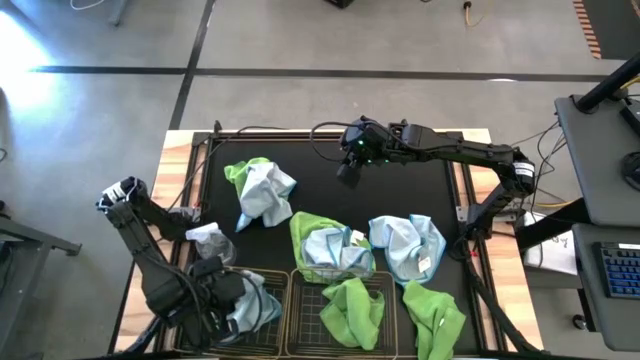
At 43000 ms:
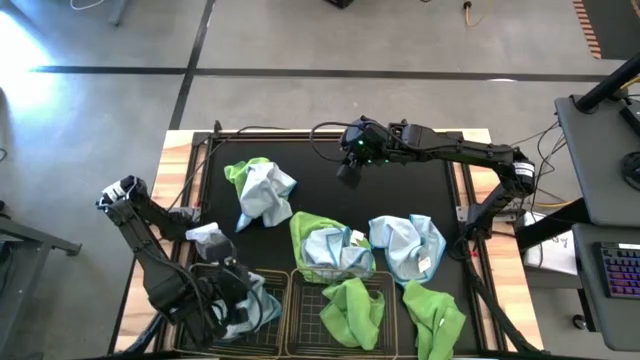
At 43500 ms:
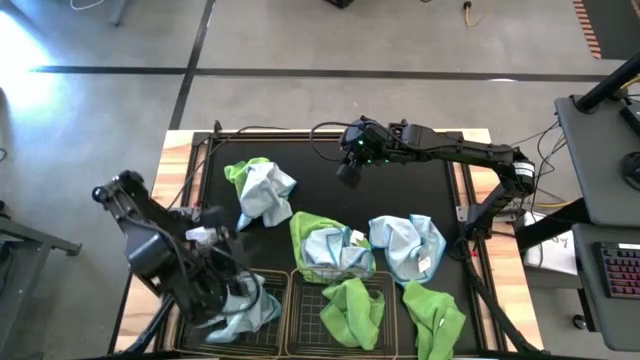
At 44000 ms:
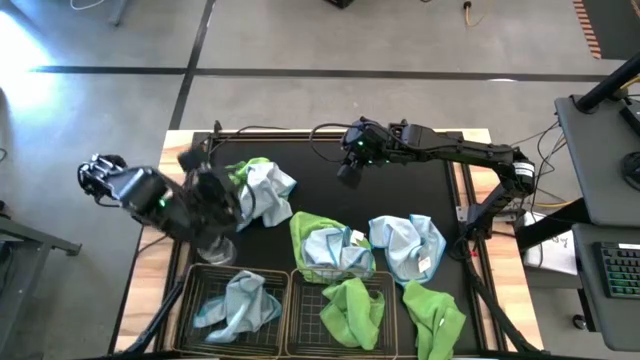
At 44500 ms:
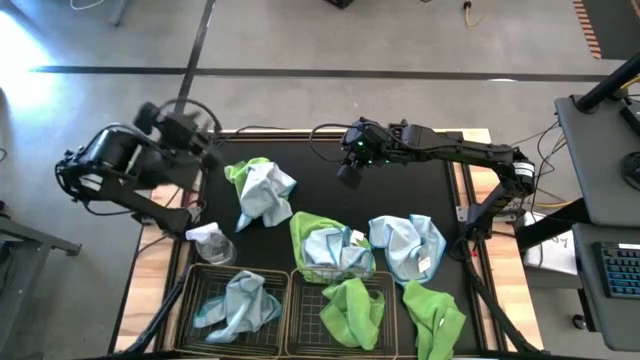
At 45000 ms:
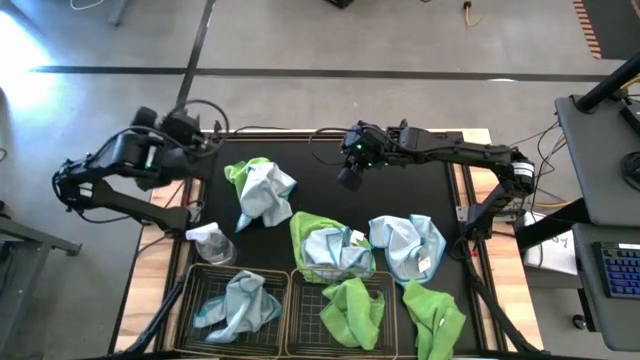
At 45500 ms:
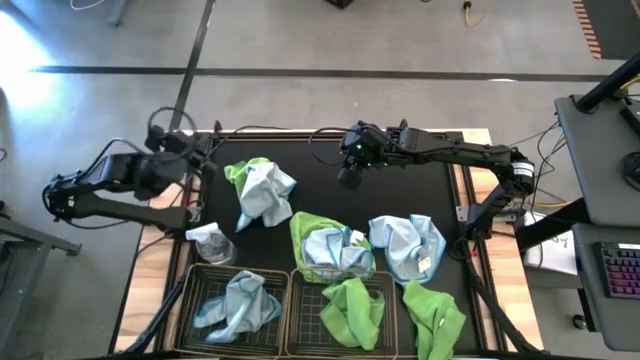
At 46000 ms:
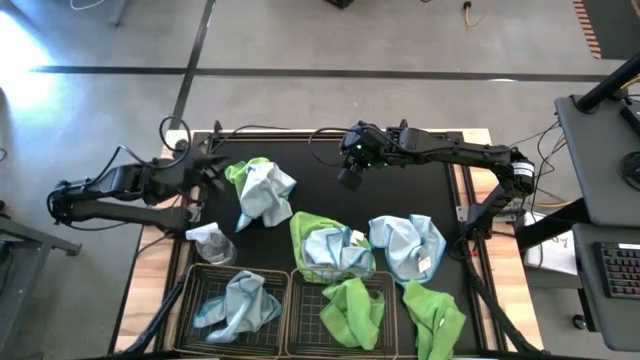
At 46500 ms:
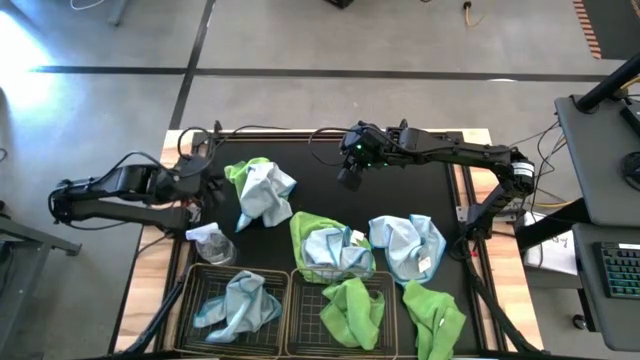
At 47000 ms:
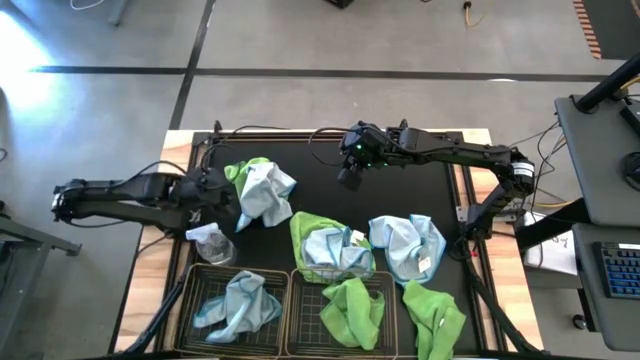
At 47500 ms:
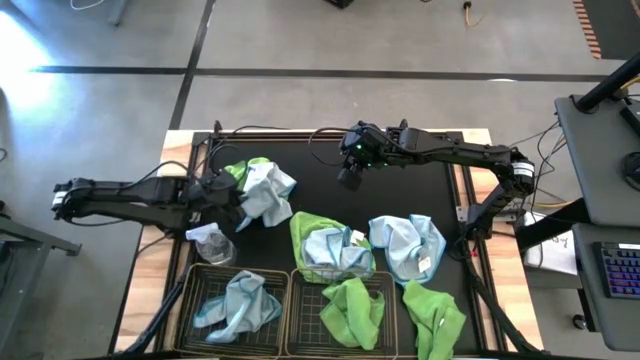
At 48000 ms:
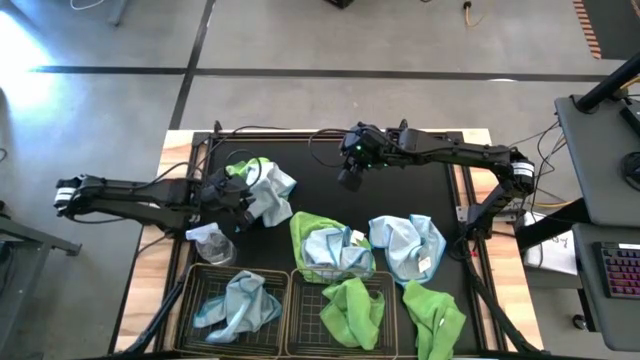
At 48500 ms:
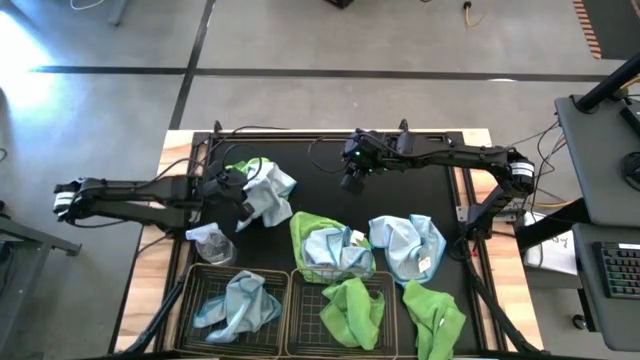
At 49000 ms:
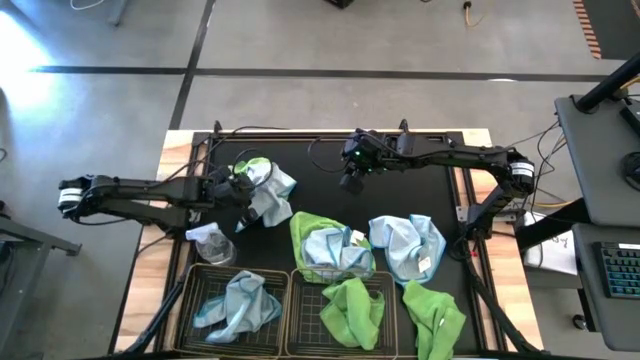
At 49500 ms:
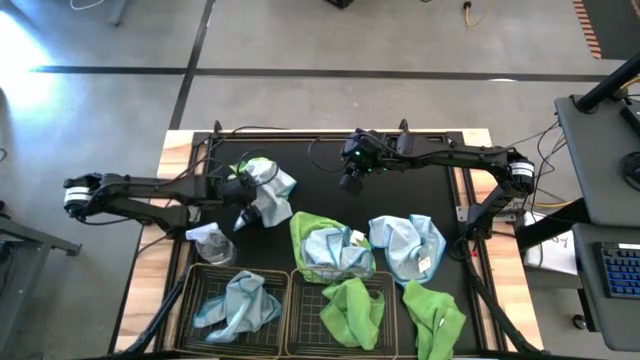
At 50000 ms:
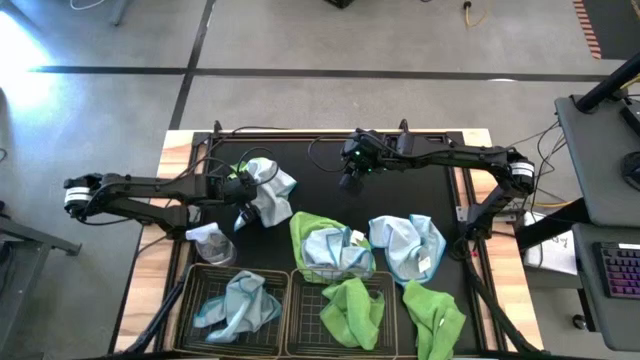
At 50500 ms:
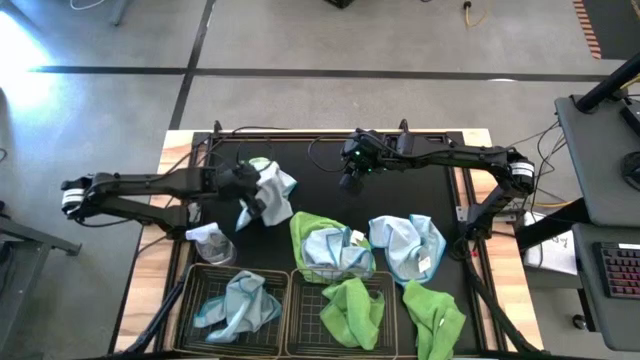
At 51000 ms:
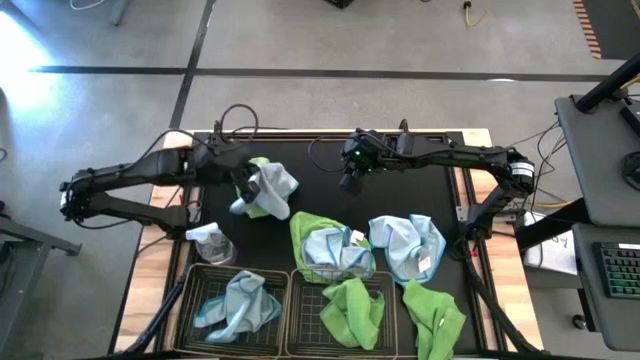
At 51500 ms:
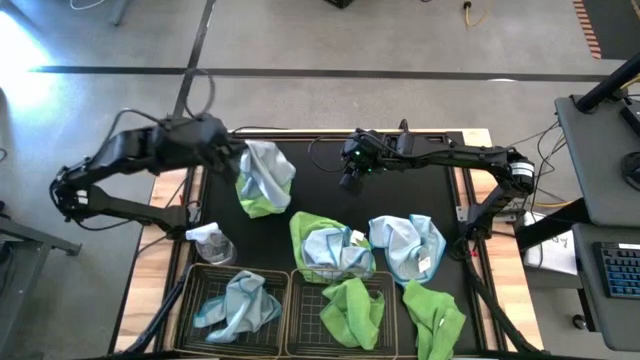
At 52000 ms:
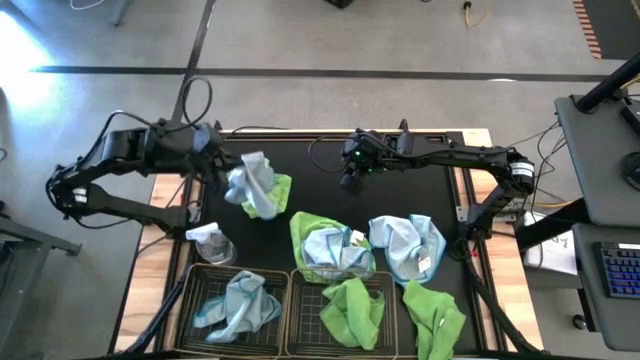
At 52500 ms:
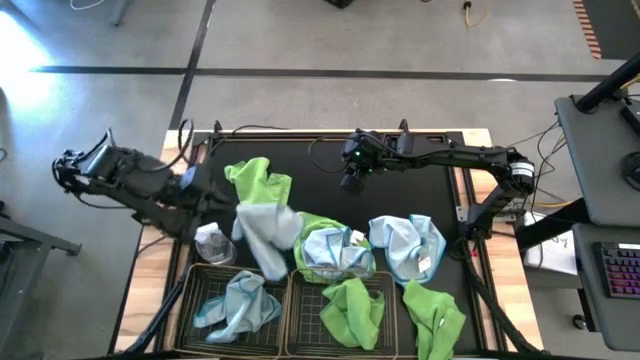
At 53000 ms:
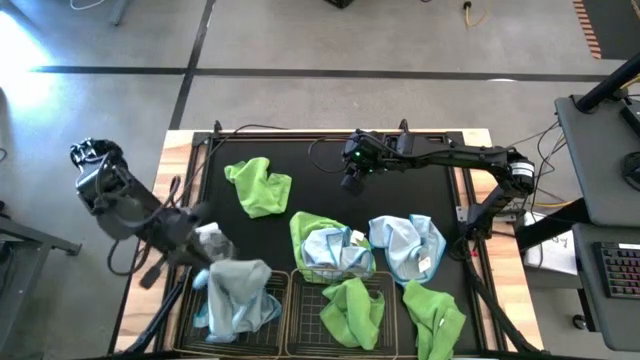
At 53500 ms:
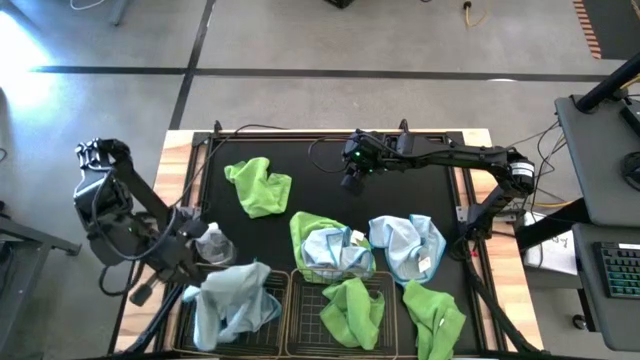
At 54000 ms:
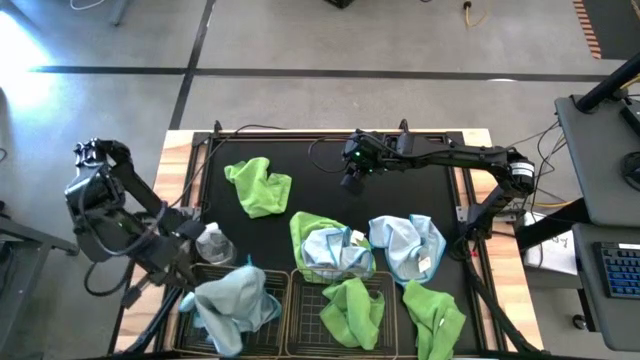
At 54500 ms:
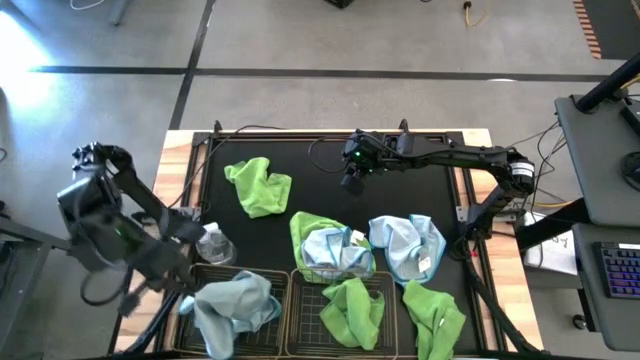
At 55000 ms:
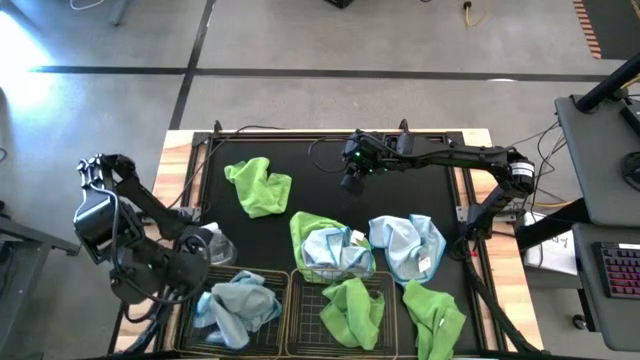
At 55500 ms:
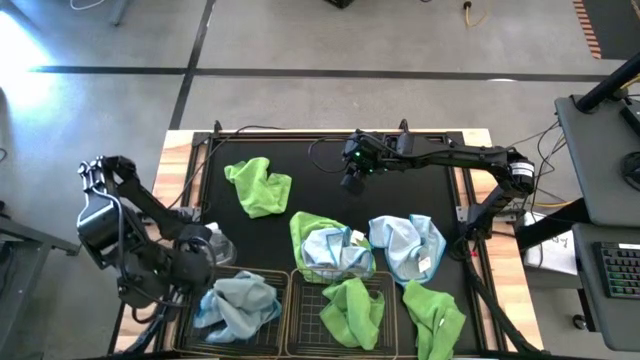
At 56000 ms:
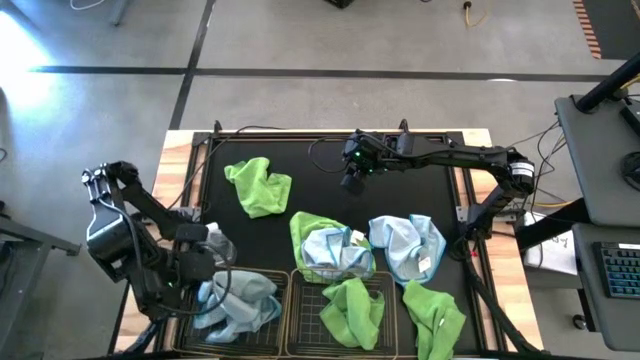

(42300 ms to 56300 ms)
Task: Sort microfiber towel by color & place in baskets
Put the top blue towel into the left wire basket

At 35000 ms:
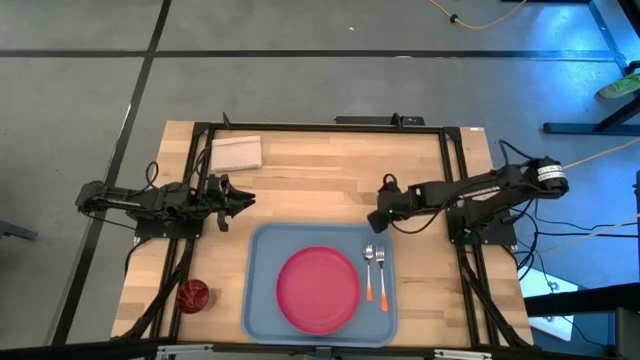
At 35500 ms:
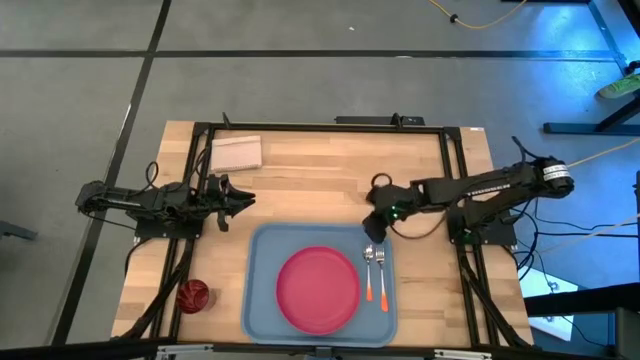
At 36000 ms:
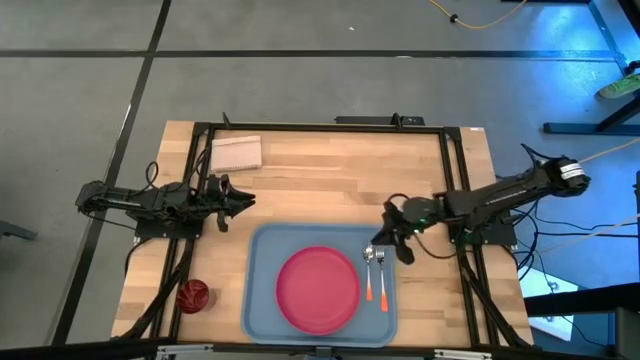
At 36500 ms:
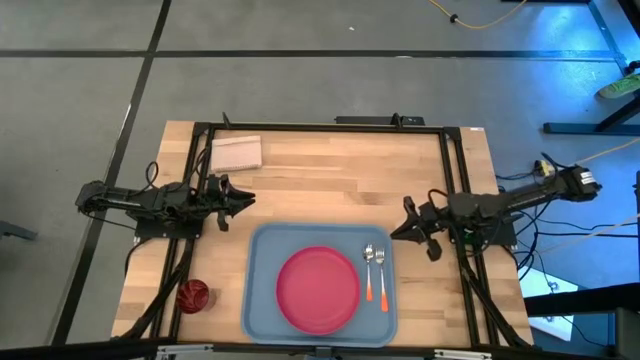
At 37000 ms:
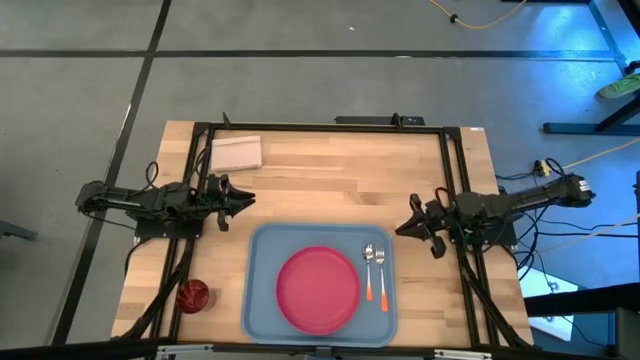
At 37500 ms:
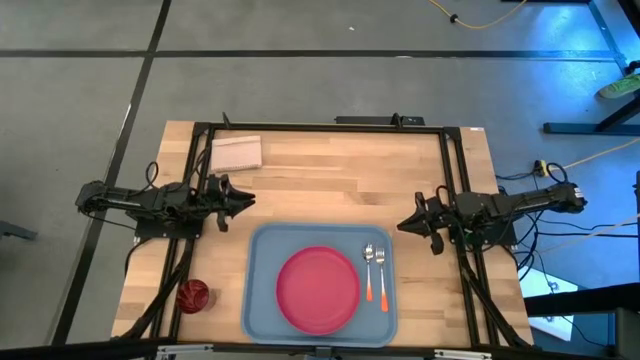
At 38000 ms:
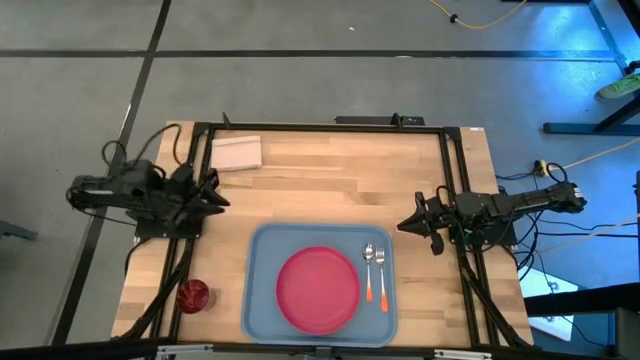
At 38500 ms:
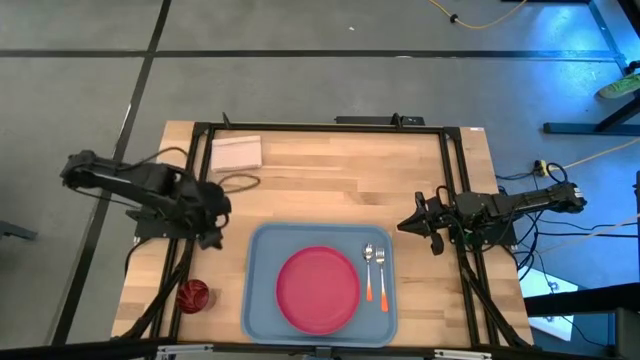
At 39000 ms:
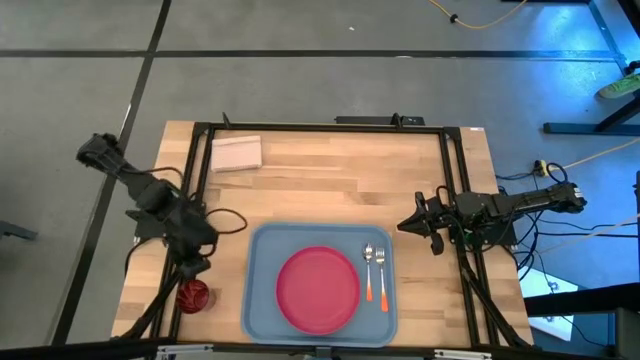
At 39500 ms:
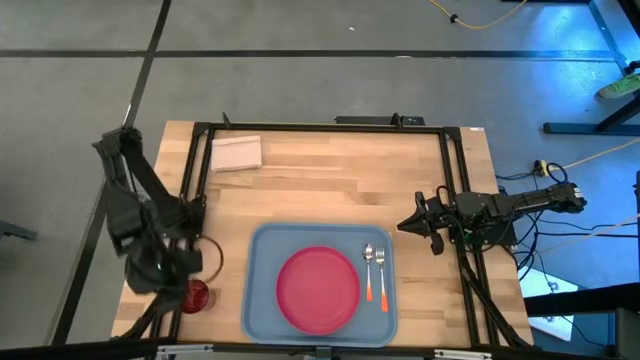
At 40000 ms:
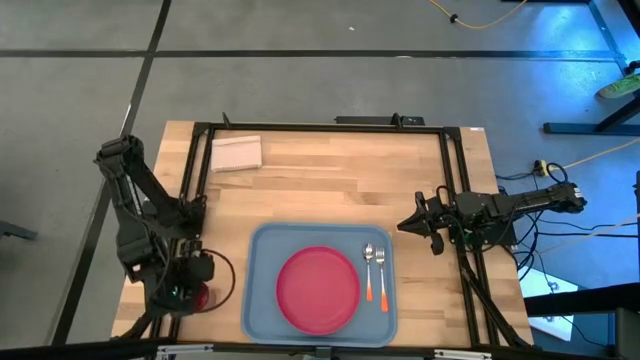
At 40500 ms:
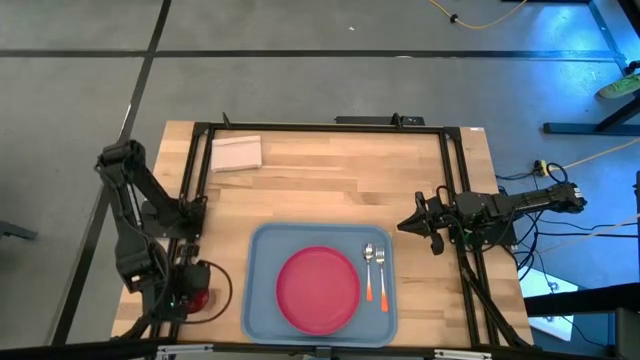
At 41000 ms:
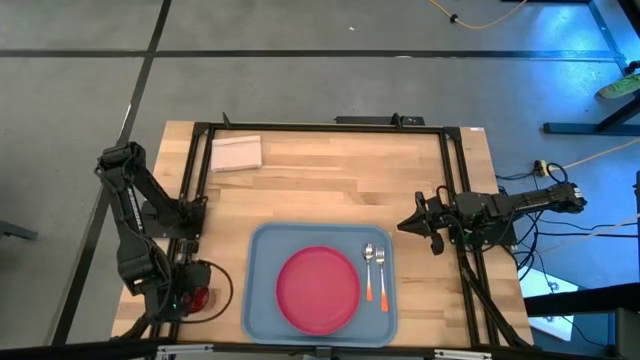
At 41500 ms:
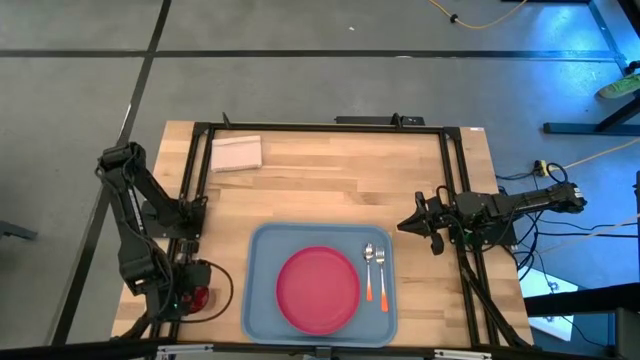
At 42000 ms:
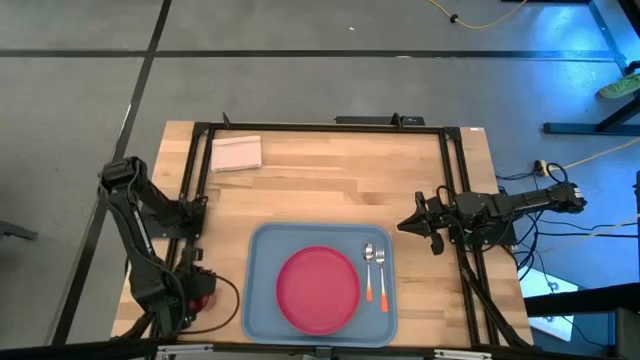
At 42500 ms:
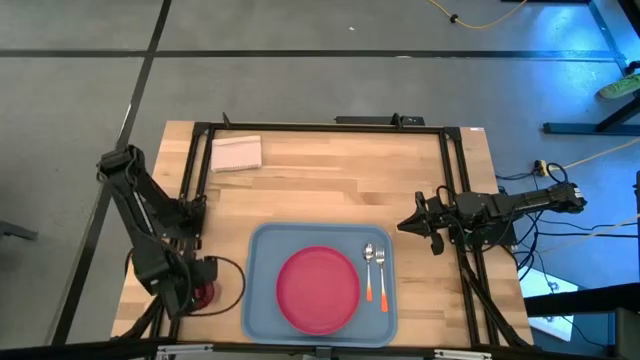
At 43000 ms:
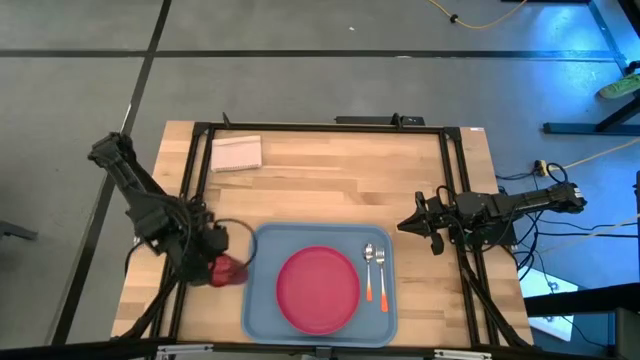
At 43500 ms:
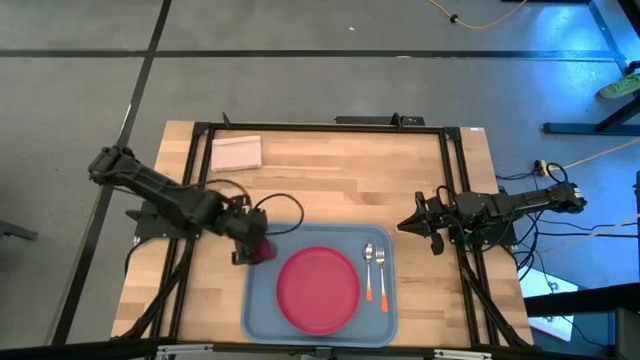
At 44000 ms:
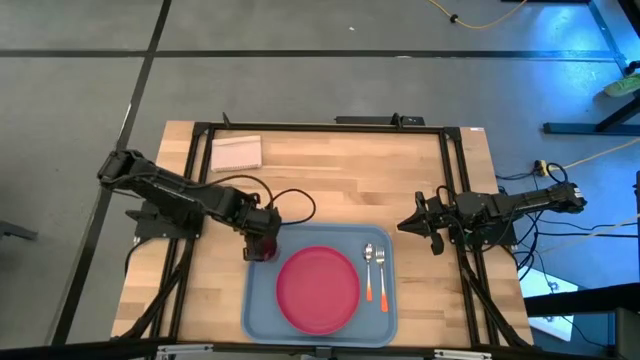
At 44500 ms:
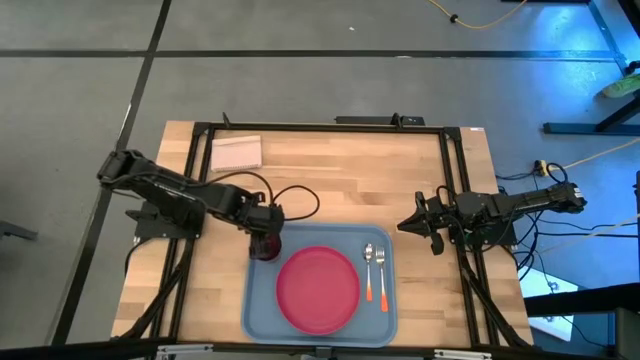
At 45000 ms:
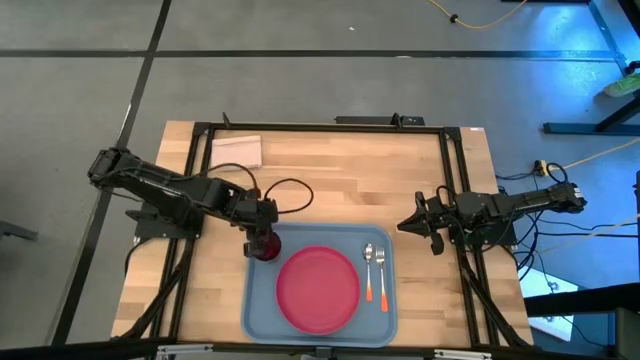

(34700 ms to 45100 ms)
Task: Pick and place plate/cup/fork/spoon on tray
Put the red cup on the blue tray to the top left of the red plate
